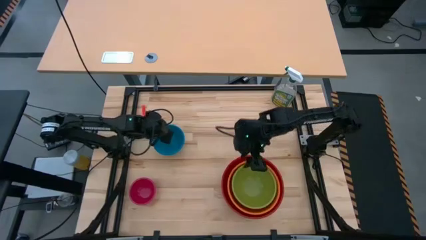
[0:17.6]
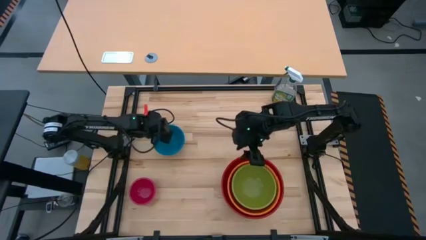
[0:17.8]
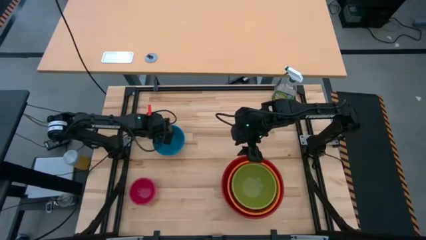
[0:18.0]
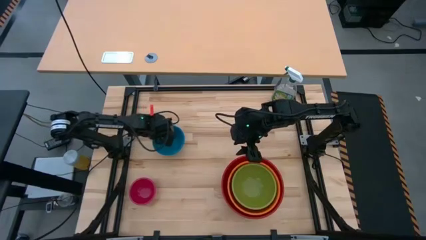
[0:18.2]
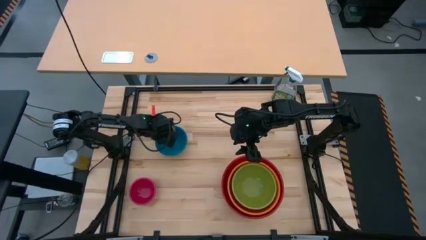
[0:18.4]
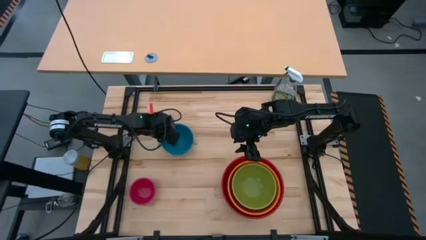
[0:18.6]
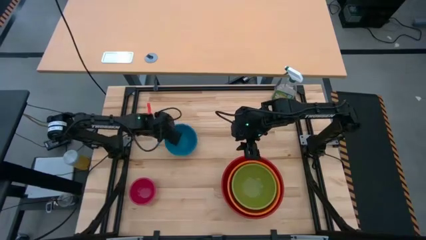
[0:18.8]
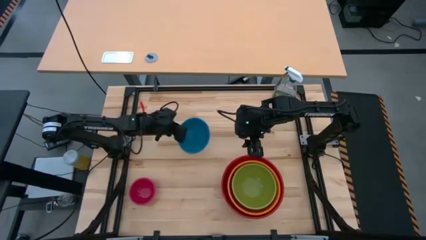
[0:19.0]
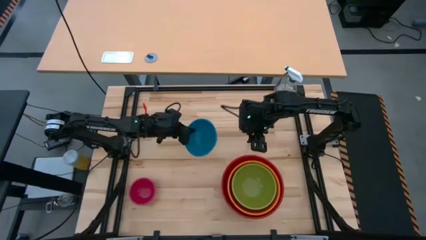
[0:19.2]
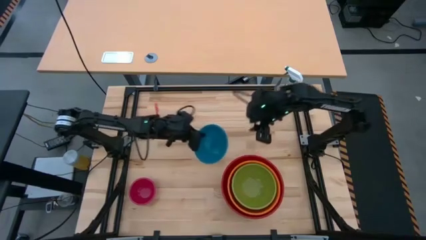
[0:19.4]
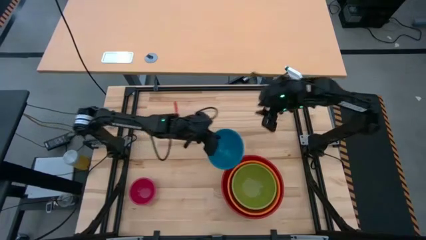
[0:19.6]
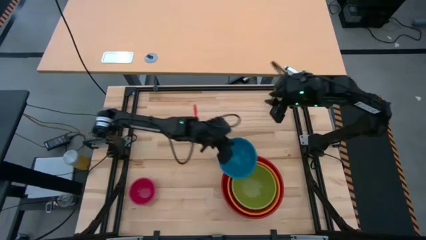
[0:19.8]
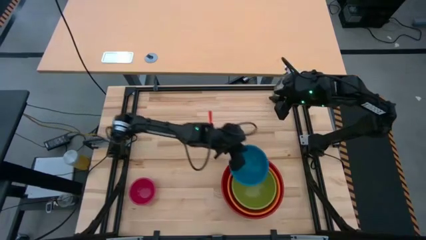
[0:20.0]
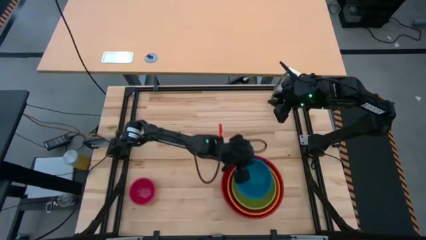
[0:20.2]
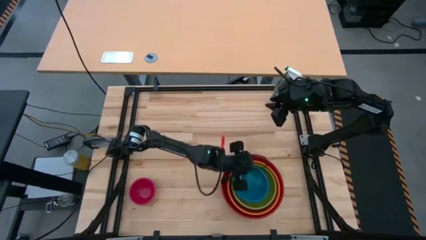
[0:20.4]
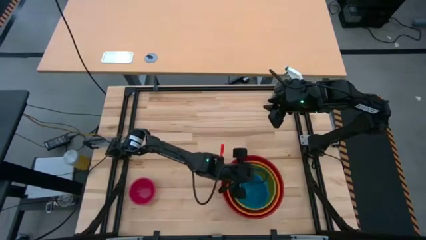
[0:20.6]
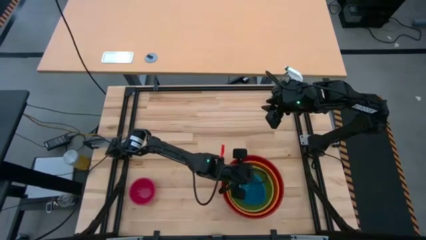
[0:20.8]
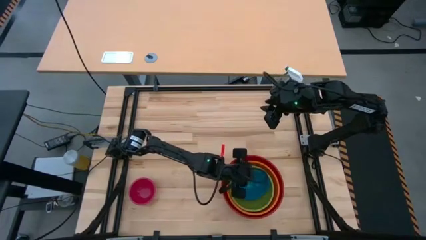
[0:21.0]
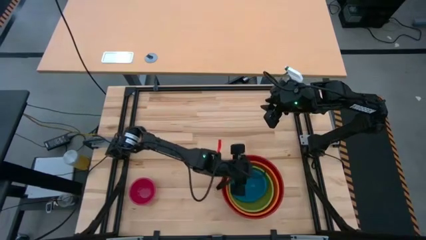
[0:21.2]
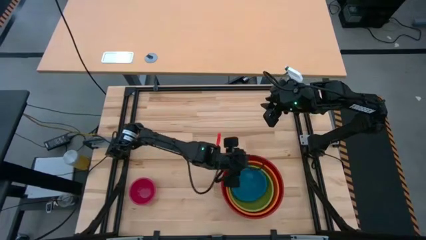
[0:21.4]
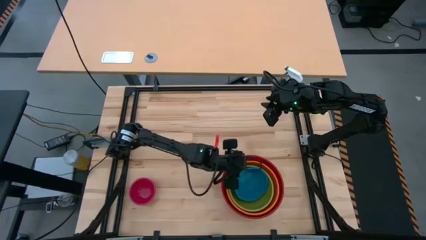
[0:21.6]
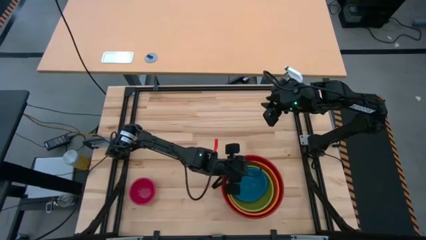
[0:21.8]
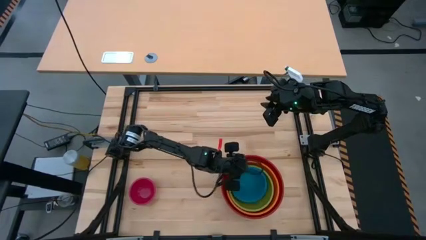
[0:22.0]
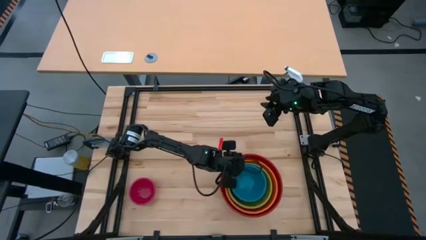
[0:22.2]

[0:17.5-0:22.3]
Stack the blue bowl on top of the green bowl

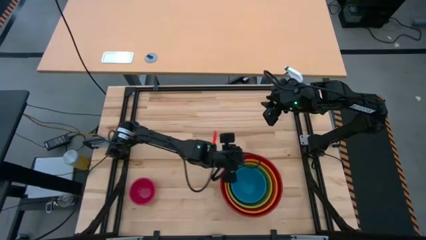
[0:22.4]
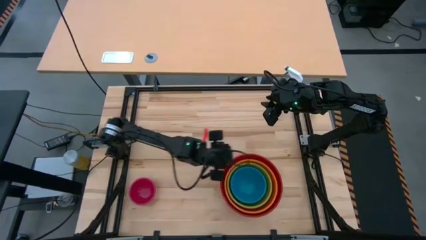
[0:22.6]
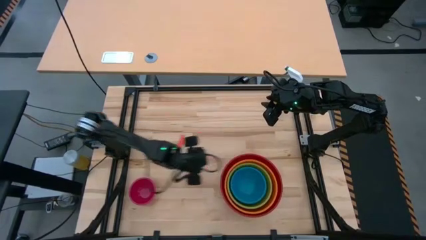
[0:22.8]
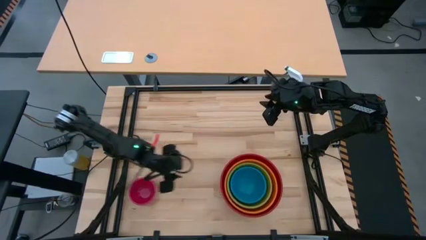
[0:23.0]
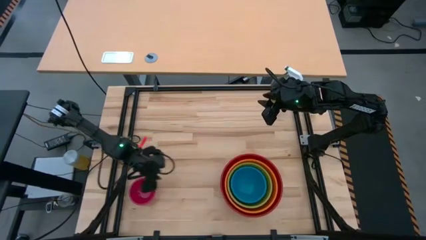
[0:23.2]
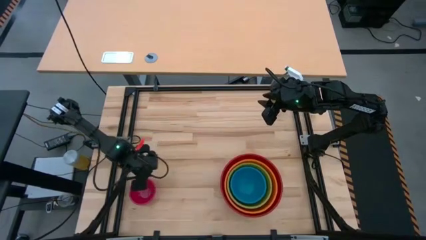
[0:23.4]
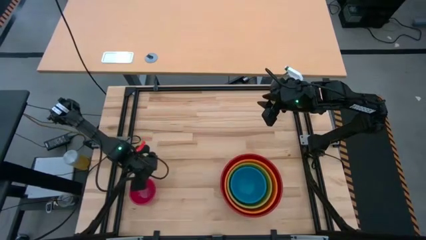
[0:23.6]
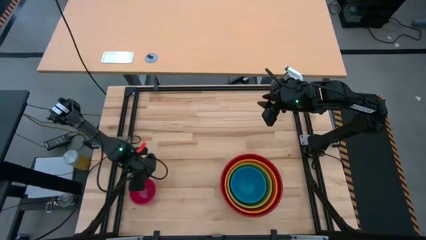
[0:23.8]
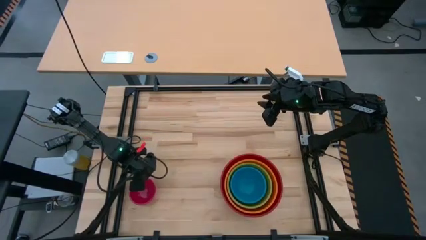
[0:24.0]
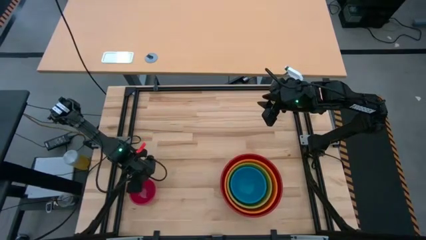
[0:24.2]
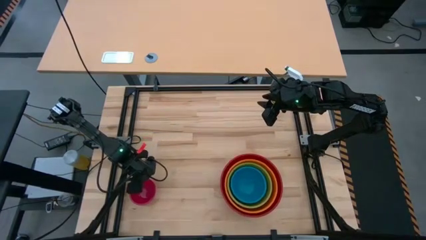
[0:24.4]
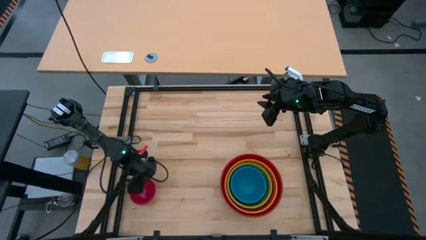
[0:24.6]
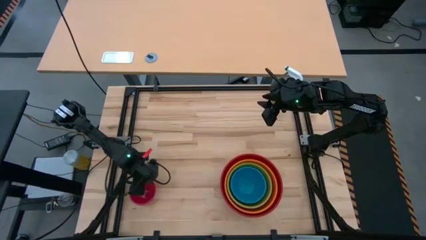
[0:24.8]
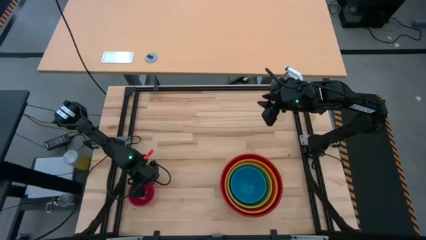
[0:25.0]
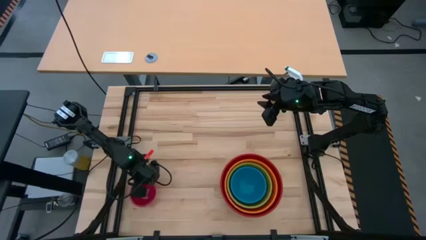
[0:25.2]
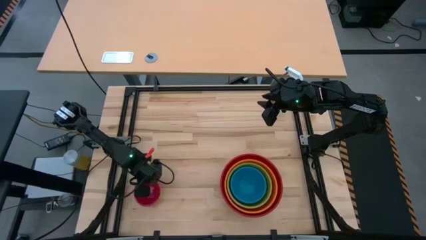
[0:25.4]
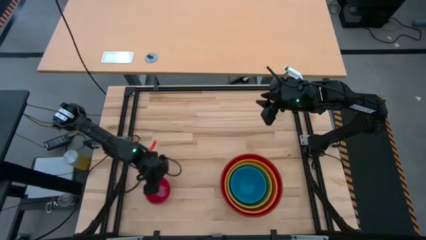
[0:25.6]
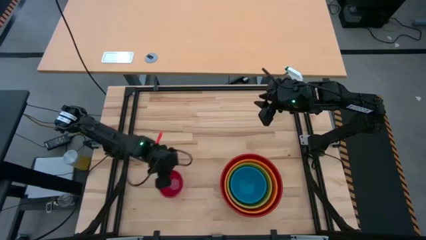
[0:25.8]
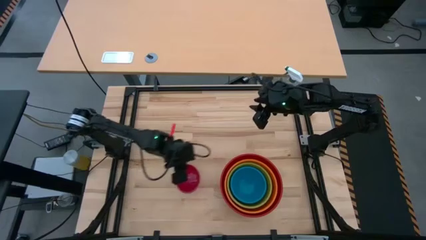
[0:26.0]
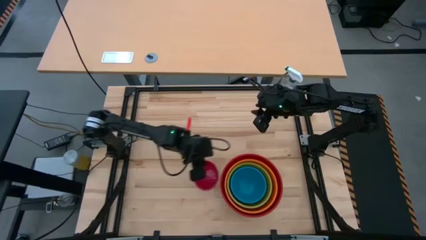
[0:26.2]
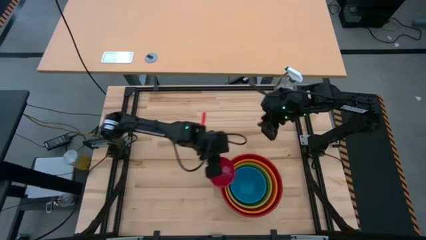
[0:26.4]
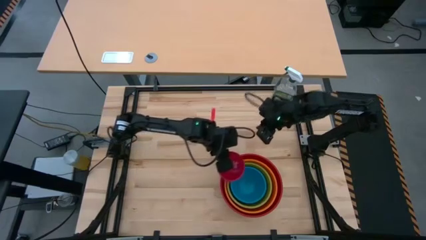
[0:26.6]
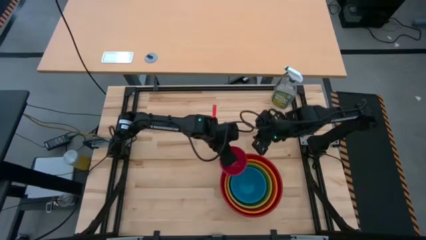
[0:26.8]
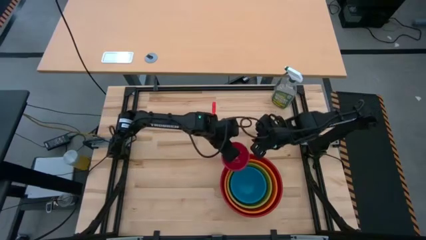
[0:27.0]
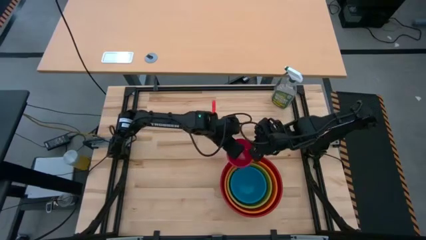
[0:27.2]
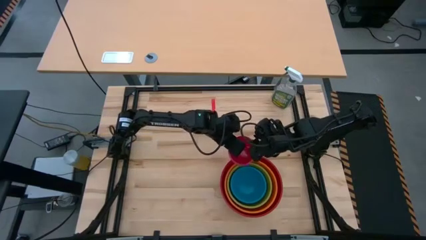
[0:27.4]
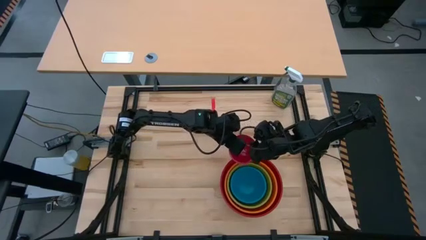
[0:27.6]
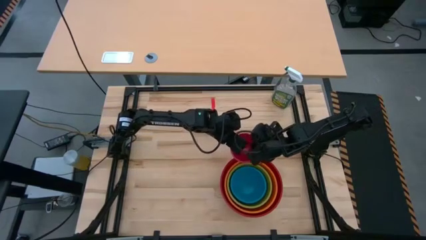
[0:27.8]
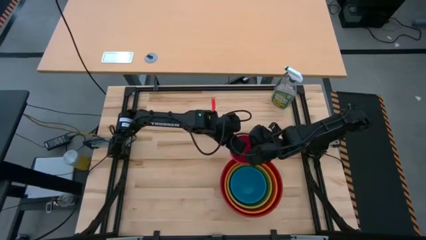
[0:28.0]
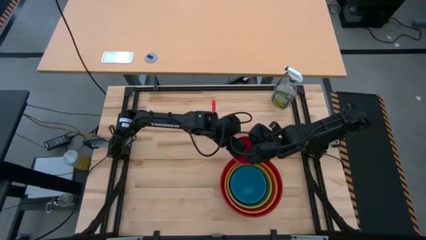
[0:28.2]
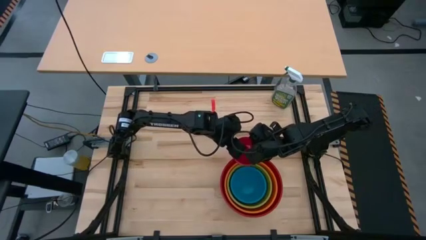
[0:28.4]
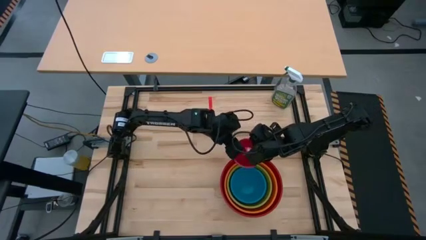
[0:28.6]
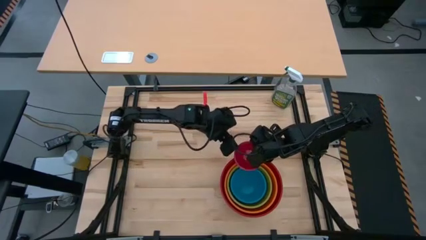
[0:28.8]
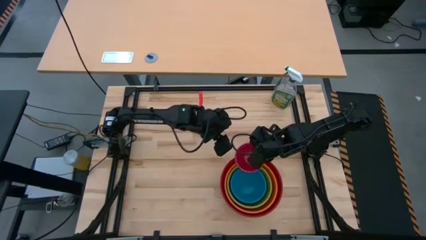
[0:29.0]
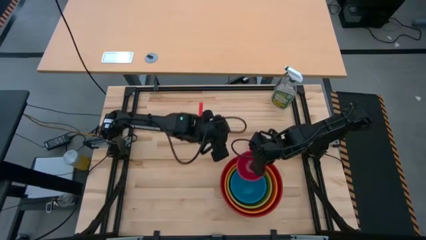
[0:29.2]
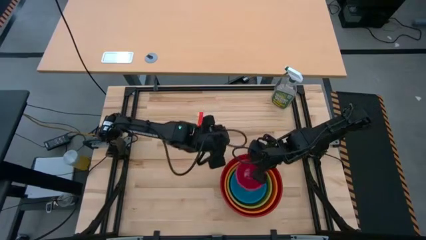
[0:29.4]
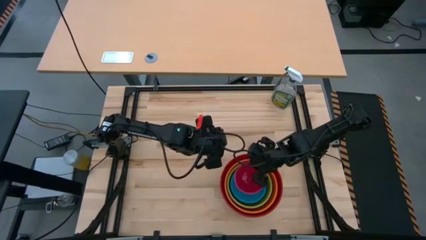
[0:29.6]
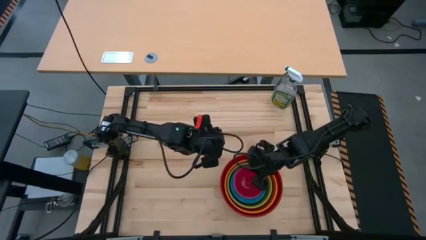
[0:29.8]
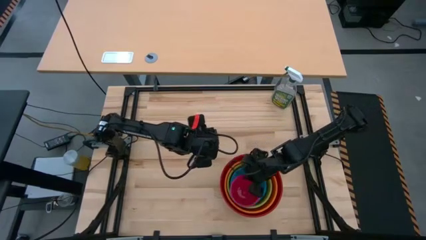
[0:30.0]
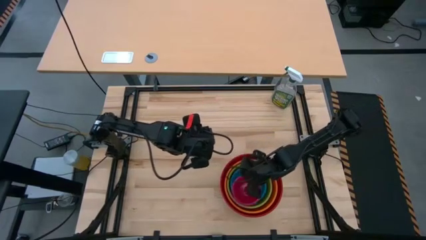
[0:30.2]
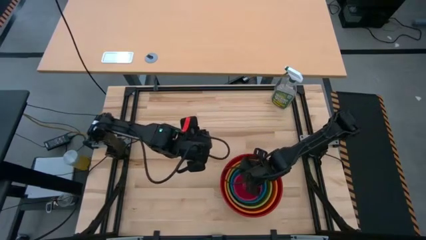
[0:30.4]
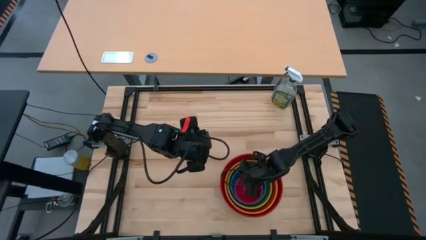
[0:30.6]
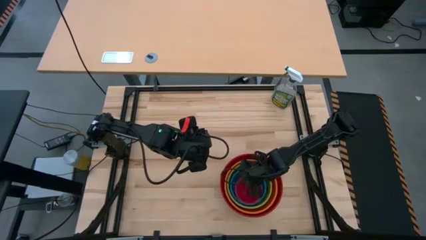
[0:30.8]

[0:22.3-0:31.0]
Stack the red bowl on top of the blue bowl

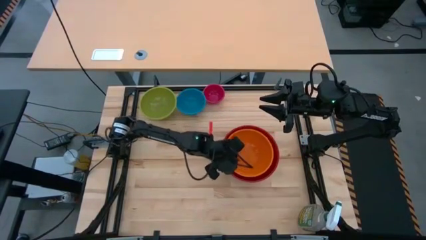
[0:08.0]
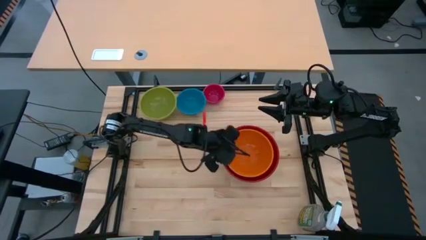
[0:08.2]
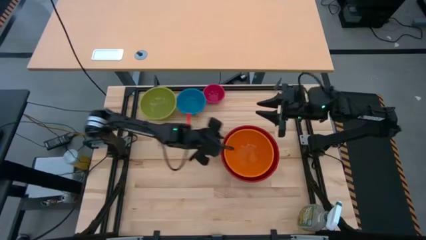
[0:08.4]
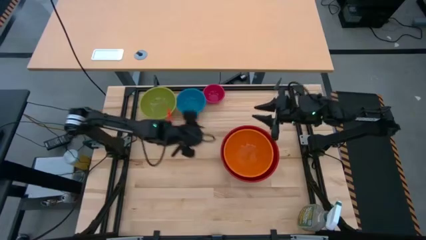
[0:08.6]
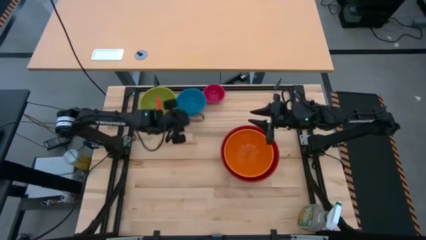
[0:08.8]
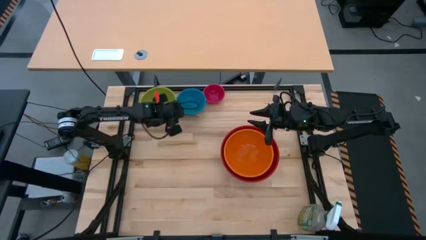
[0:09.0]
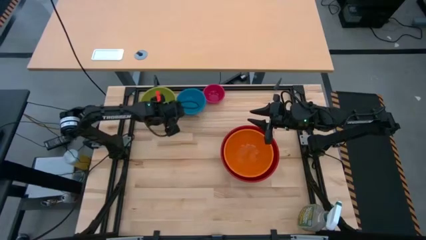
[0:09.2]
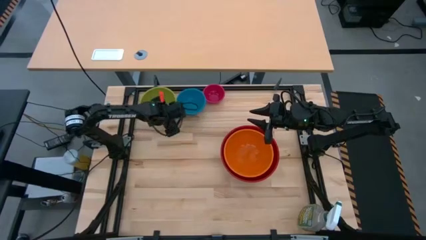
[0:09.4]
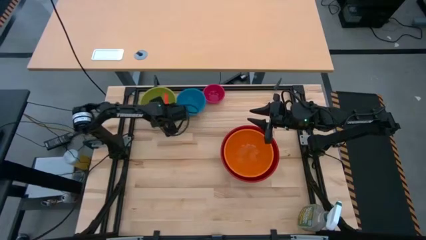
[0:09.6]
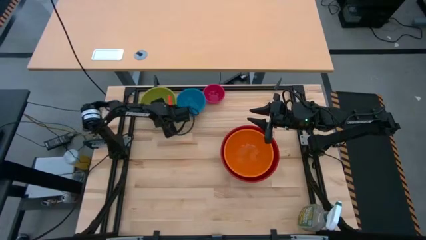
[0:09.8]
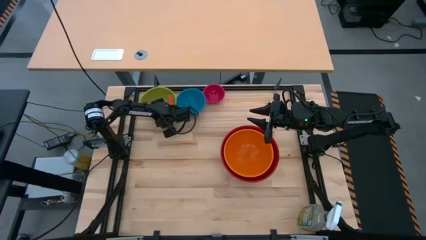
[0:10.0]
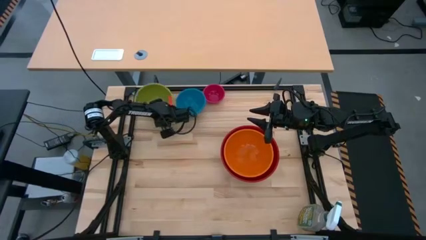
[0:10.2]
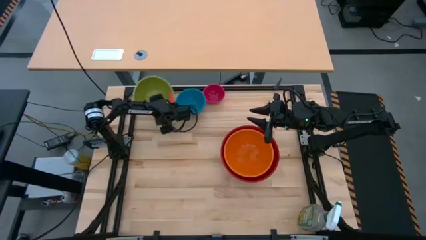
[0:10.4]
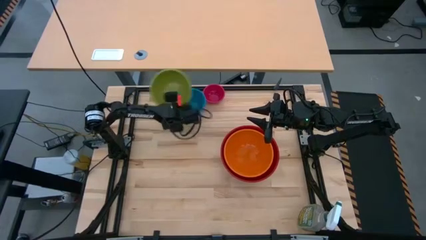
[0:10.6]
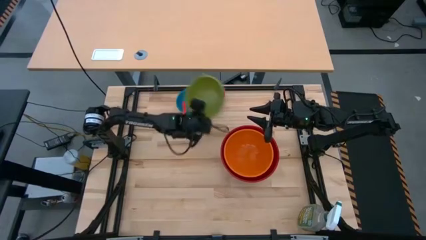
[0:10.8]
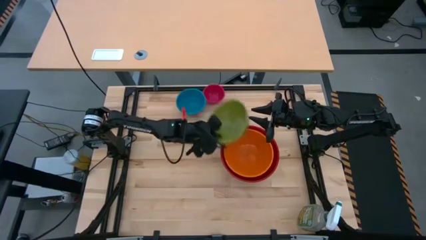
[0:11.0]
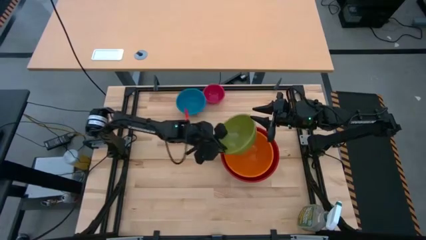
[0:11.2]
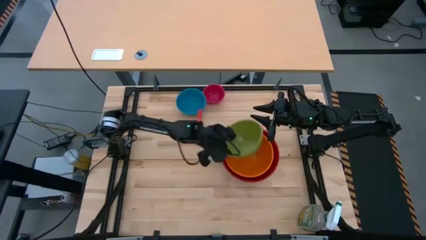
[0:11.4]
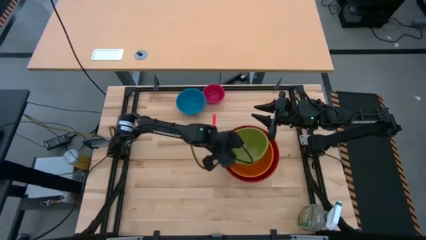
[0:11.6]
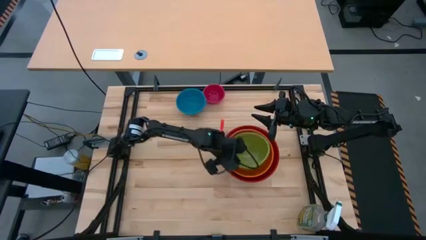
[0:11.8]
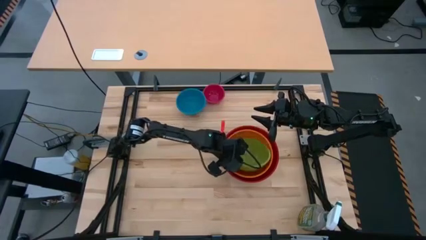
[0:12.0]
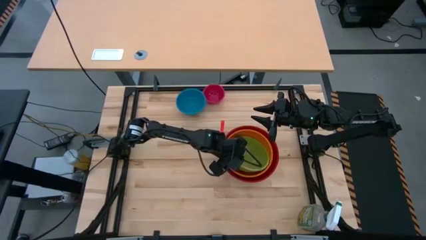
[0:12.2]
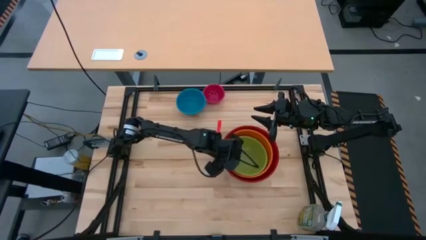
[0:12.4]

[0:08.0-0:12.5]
Stack the green bowl on top of the orange bowl
